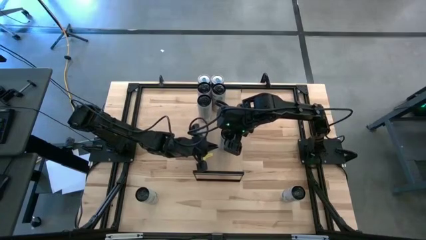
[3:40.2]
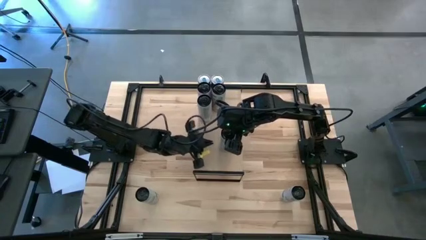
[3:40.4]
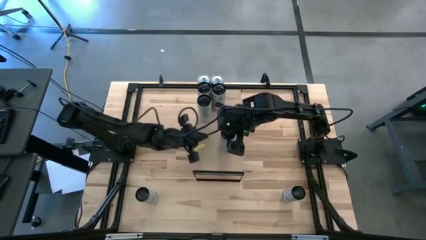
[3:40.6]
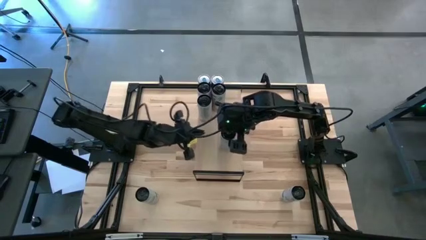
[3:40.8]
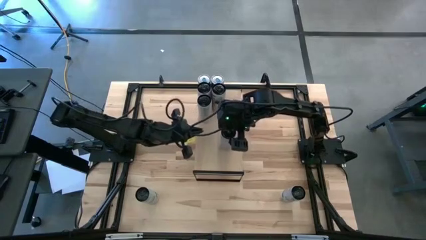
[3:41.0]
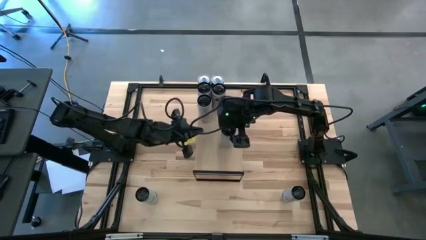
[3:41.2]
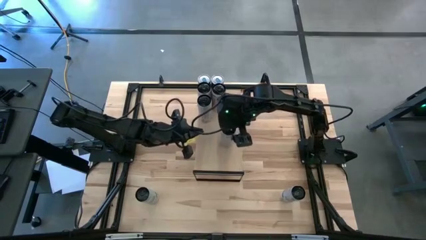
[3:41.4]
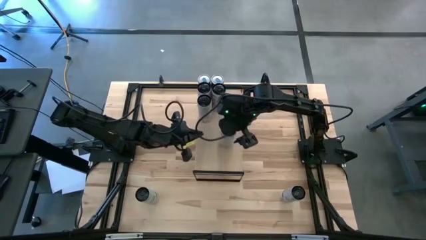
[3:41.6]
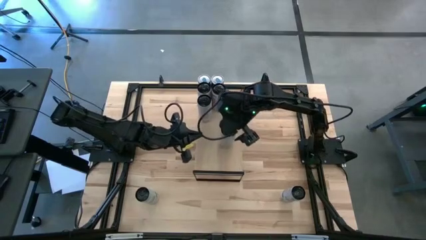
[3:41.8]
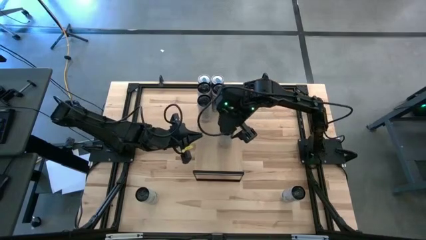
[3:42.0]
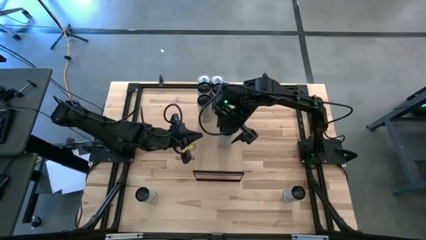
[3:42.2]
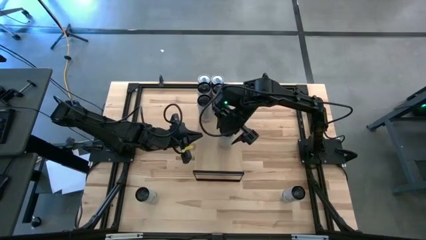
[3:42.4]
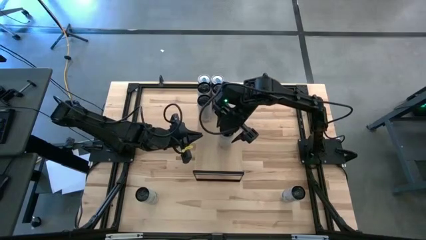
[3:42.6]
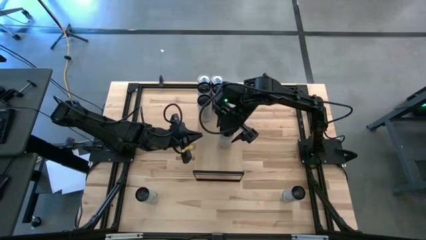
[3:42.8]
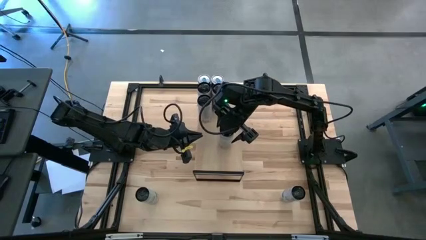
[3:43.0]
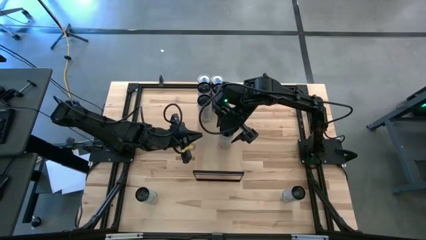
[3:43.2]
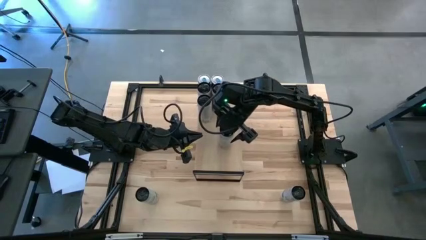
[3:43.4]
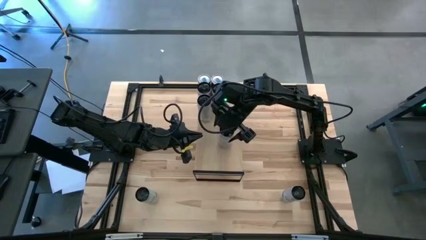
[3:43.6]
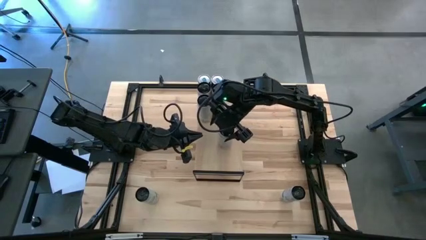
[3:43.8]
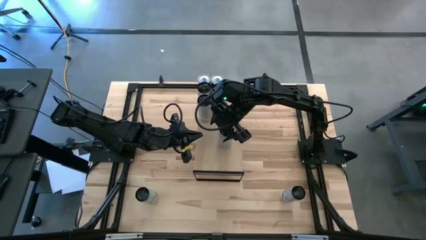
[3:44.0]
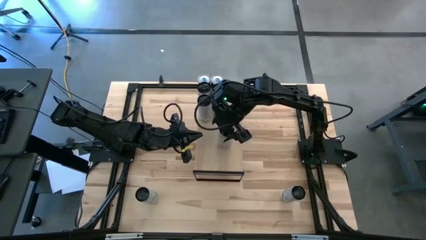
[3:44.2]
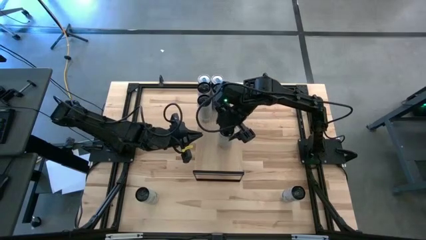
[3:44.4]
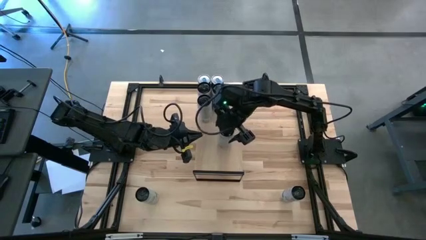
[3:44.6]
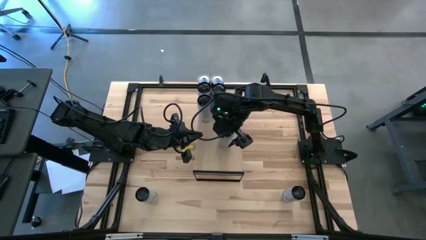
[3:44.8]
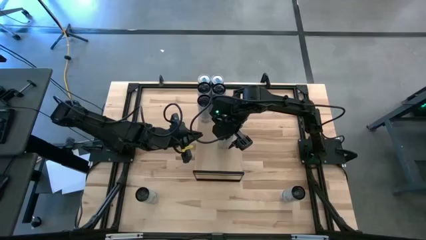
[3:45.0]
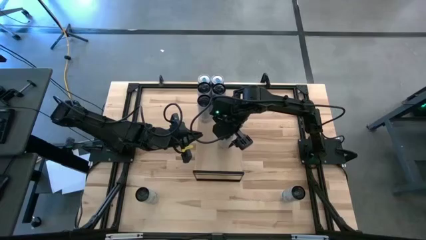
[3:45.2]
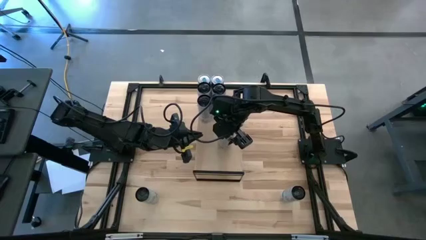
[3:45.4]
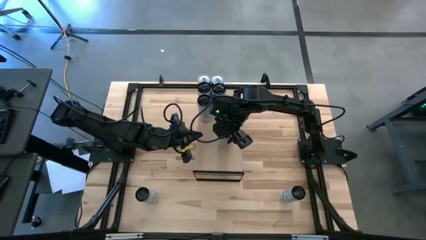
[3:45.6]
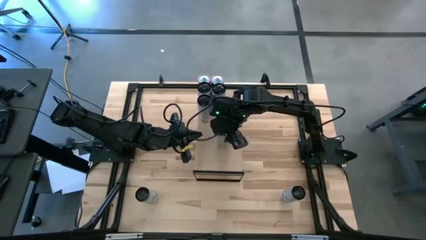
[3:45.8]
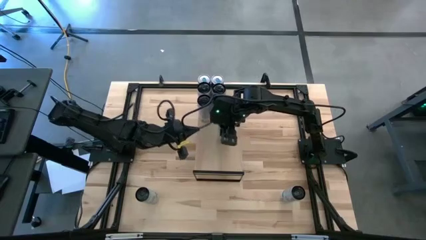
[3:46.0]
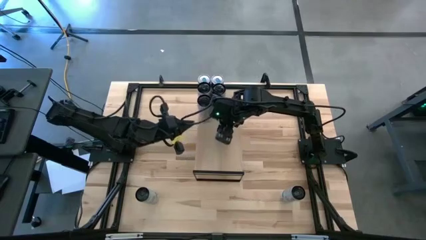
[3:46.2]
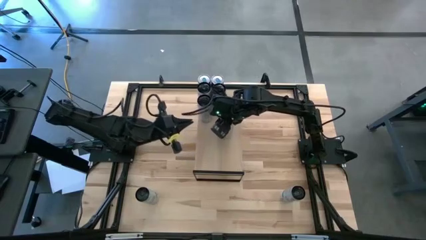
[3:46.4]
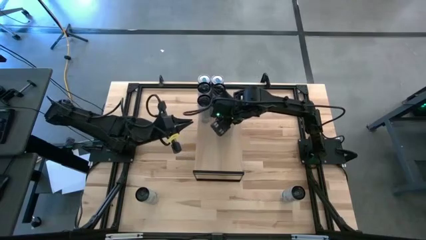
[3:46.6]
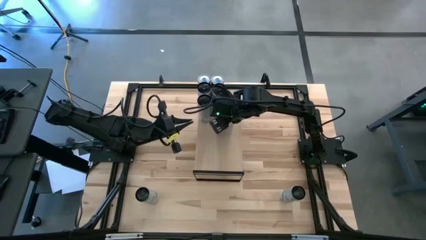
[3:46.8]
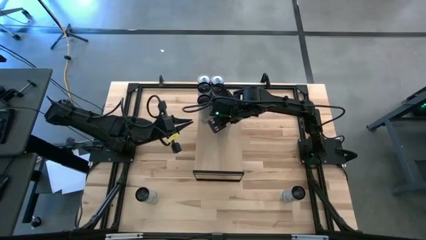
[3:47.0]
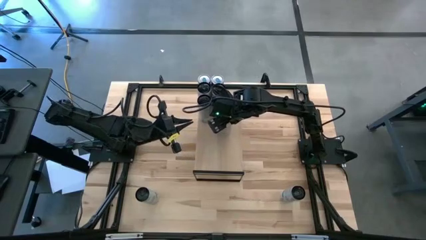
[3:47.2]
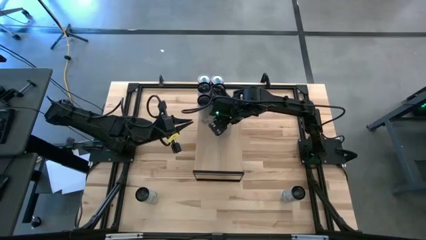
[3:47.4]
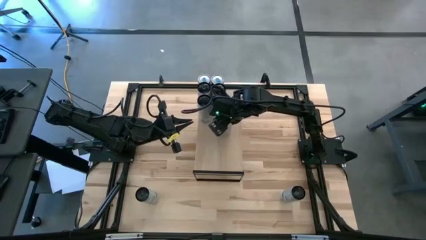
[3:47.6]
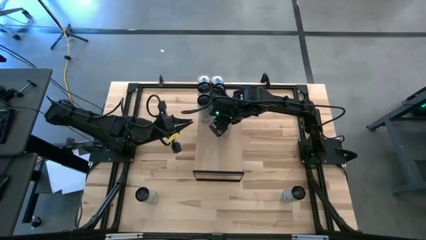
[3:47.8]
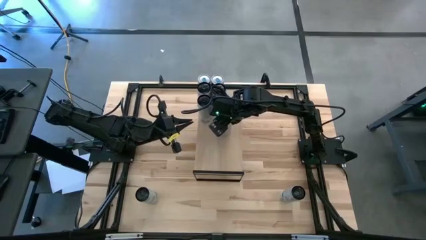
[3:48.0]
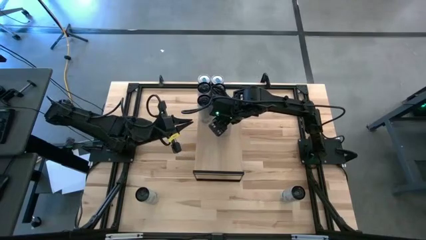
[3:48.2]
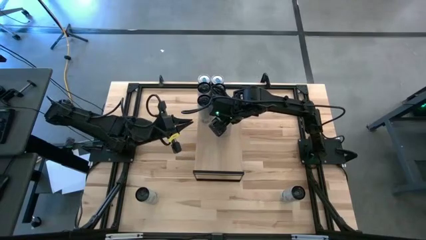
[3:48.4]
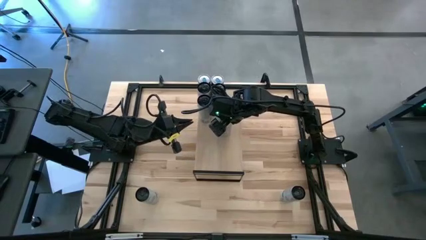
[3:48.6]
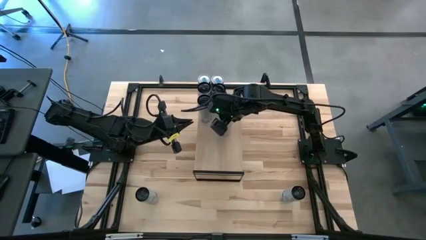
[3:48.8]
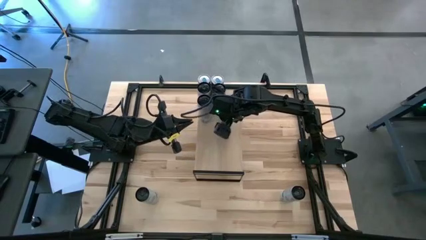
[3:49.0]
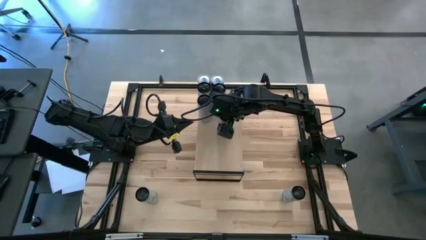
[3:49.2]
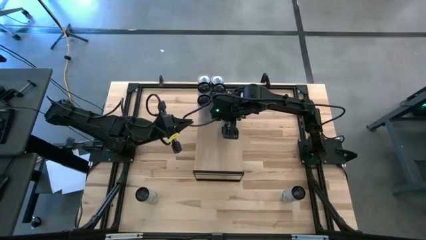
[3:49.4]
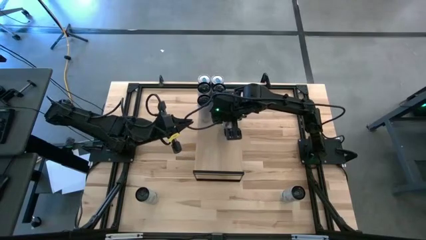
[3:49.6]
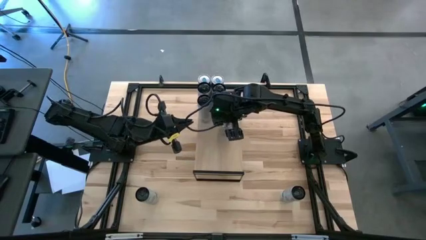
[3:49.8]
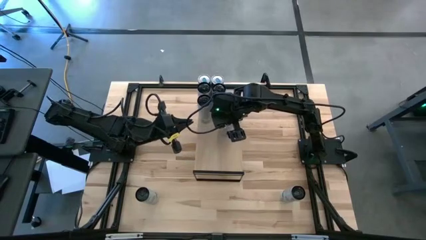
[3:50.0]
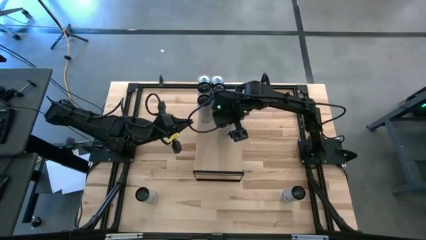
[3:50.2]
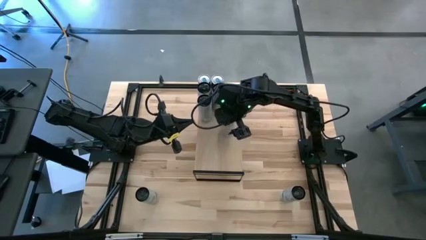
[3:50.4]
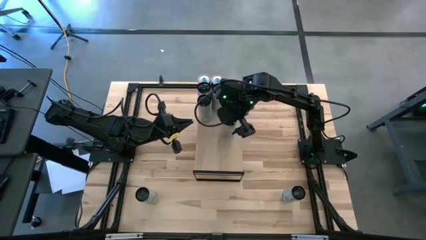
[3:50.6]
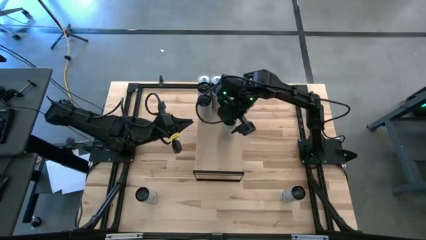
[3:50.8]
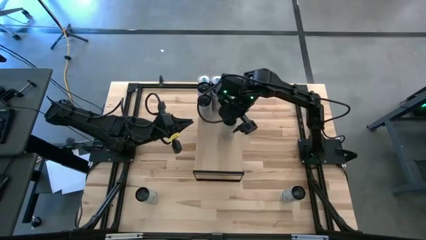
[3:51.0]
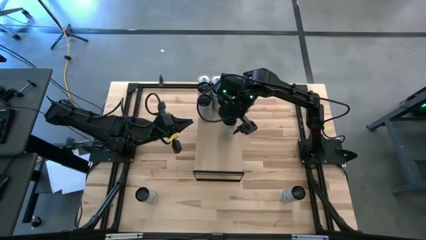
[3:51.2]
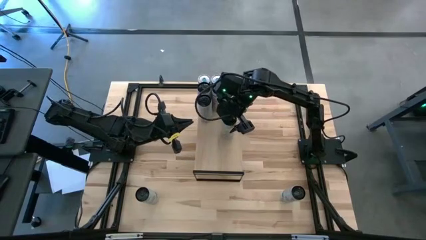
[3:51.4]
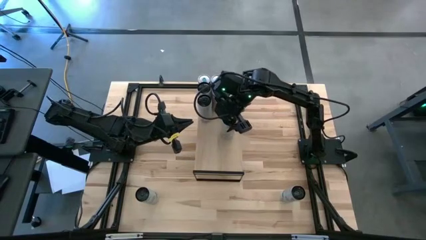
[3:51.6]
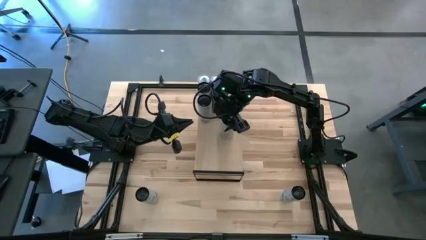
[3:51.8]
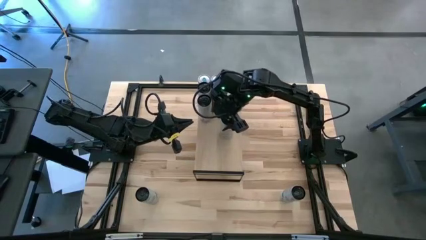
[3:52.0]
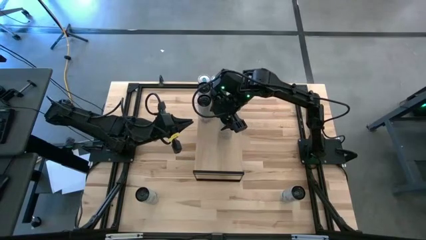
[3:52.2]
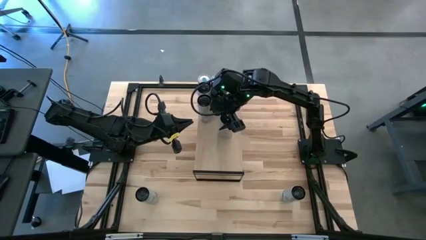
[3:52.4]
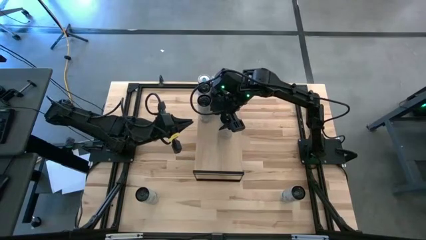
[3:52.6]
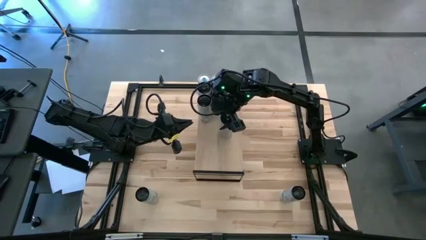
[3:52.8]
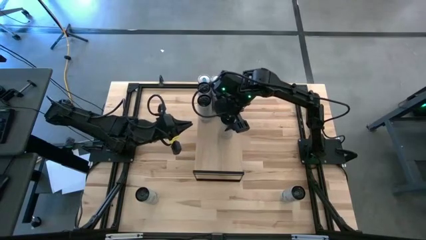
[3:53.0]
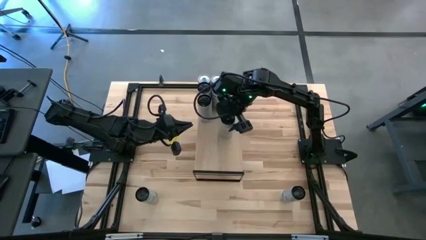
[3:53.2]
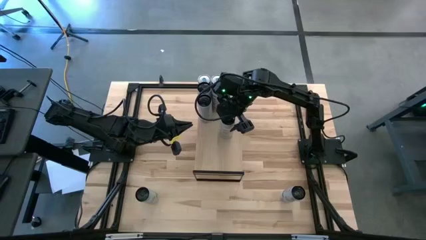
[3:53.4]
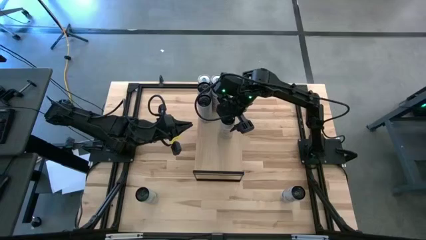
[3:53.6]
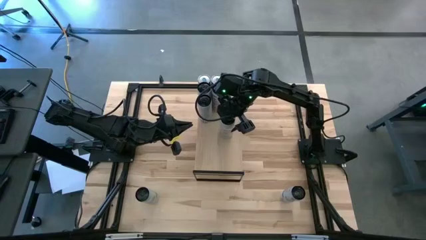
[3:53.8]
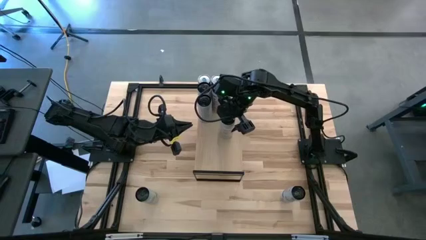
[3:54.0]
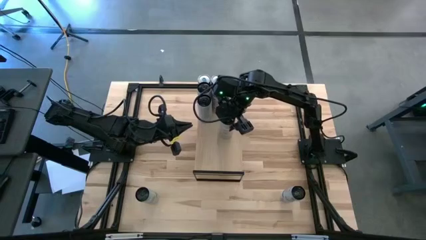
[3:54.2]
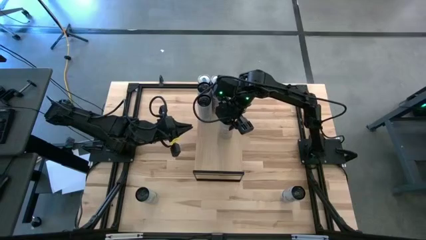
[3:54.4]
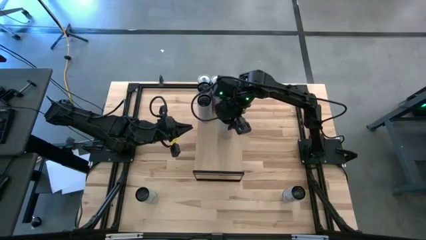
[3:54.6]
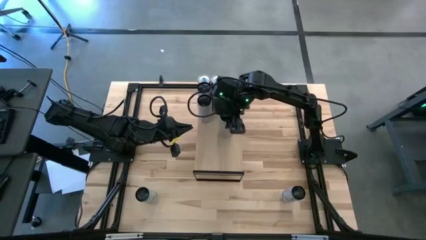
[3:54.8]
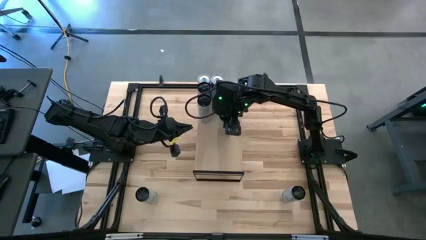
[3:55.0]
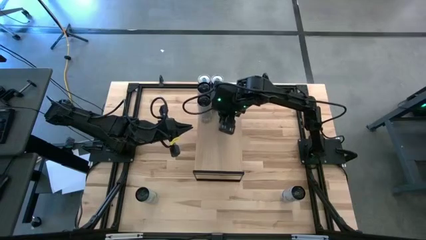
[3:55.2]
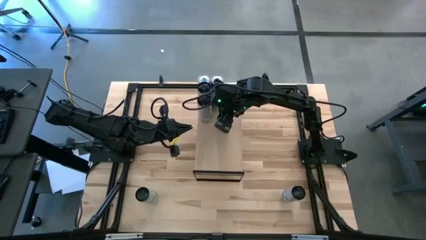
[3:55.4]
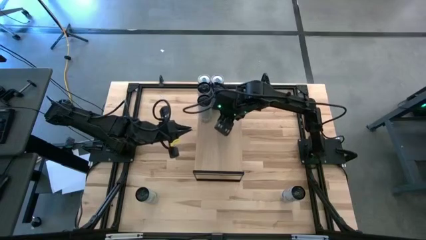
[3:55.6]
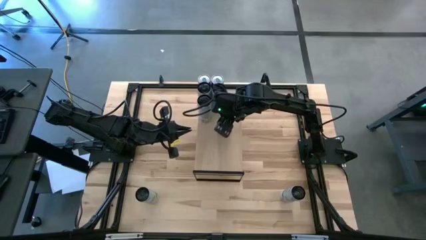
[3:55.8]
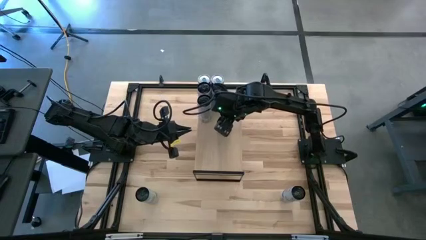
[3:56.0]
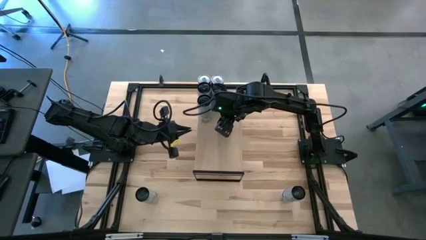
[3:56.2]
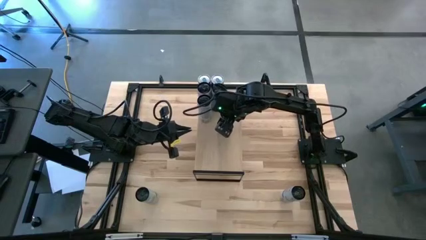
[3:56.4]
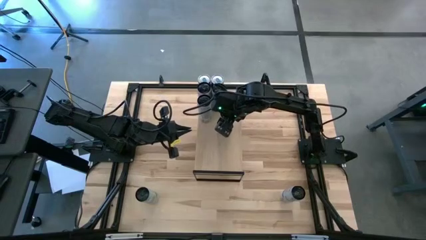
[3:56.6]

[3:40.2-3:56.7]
Task: Place canned beverage on shelf
Put the white yellow soda can on the shelf aligned with the other white yellow soda can
